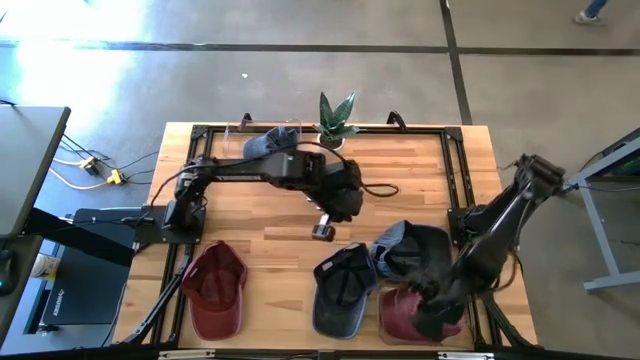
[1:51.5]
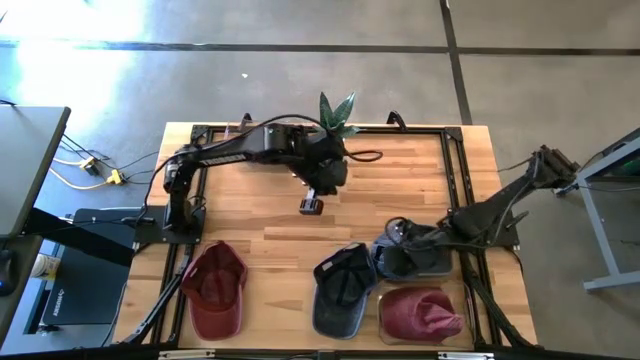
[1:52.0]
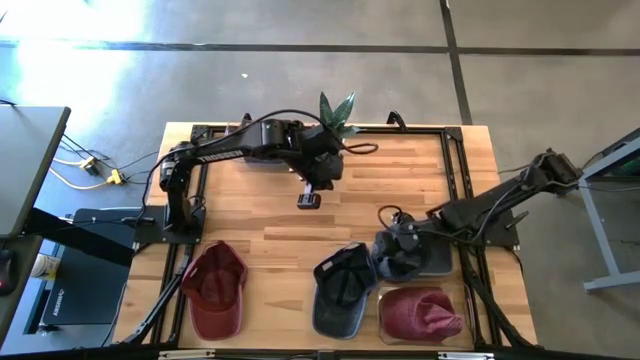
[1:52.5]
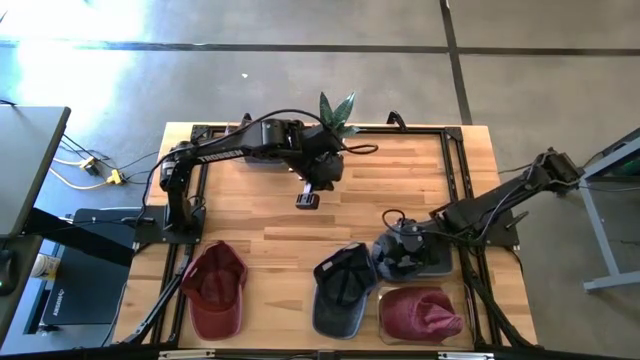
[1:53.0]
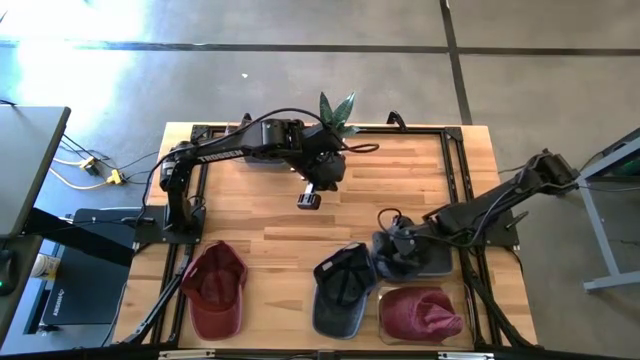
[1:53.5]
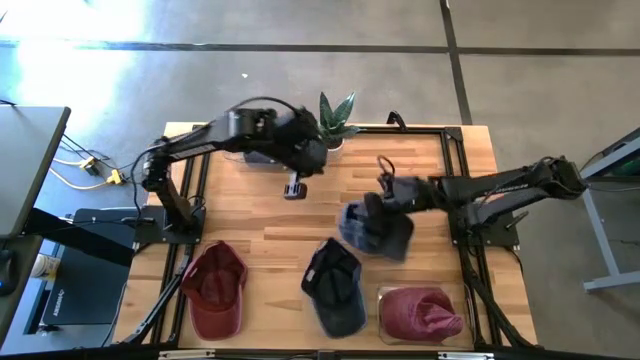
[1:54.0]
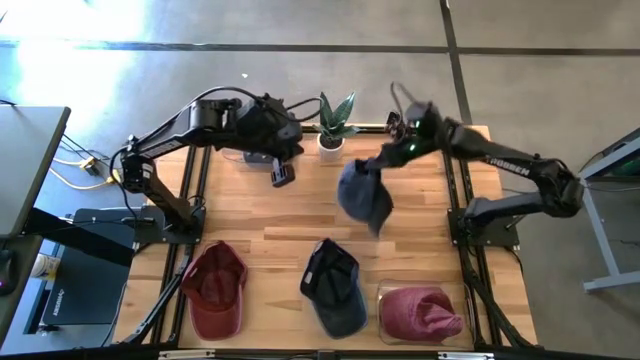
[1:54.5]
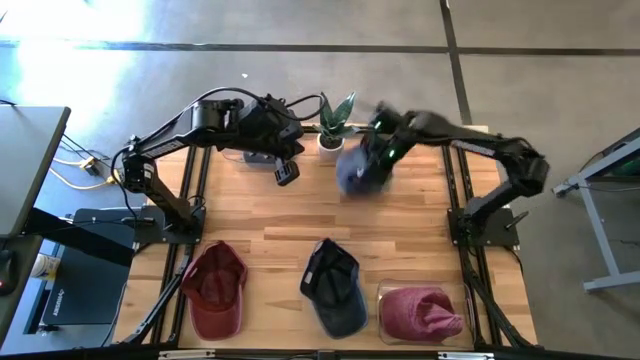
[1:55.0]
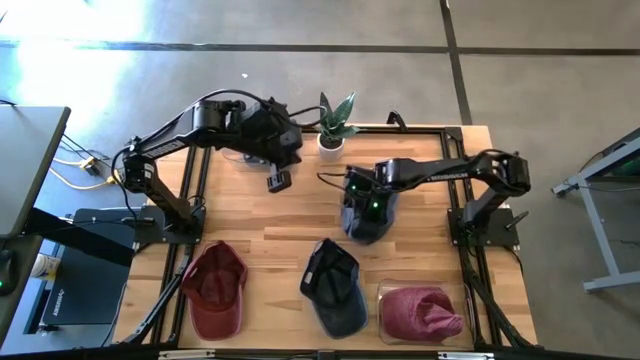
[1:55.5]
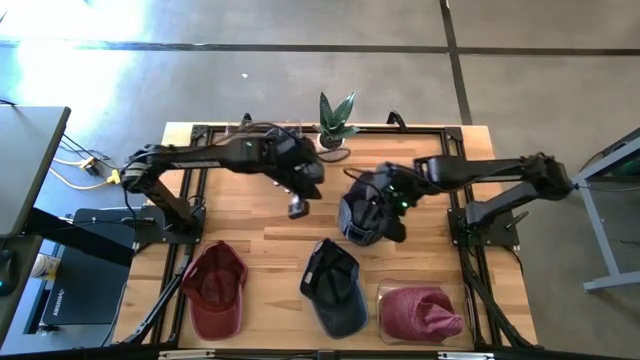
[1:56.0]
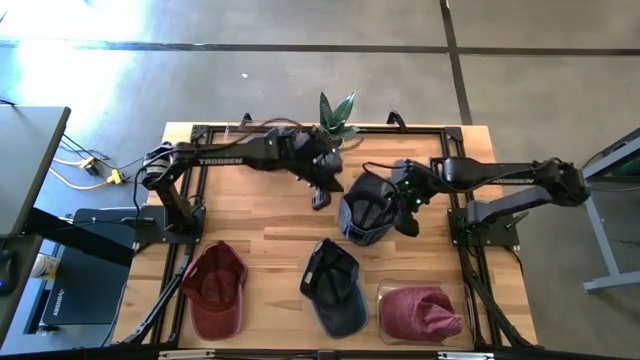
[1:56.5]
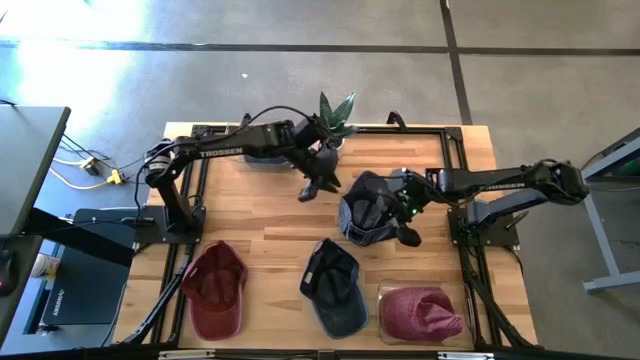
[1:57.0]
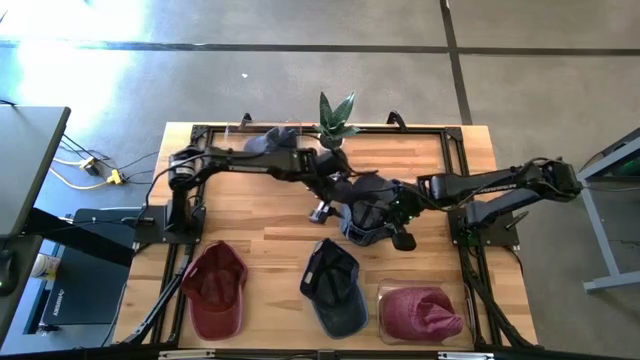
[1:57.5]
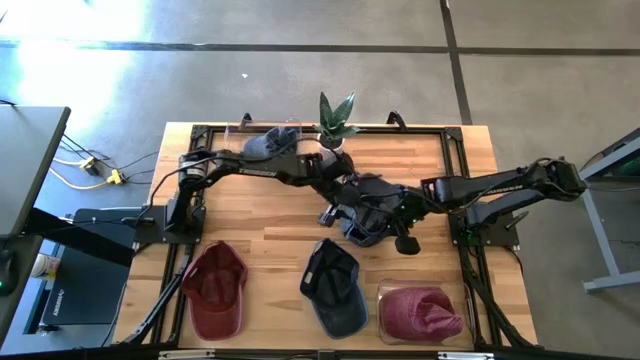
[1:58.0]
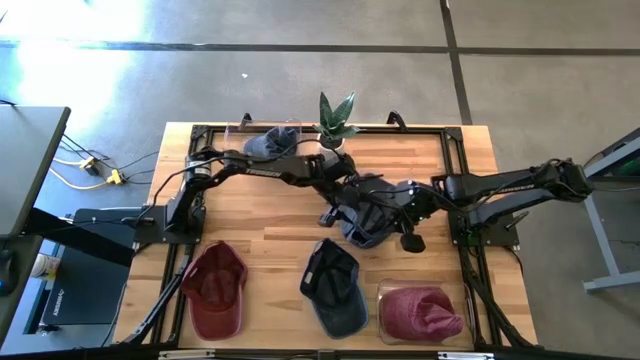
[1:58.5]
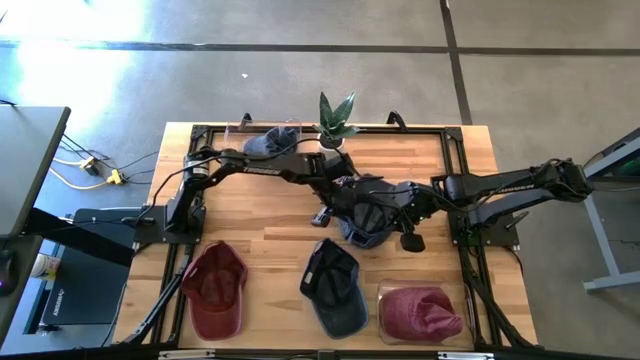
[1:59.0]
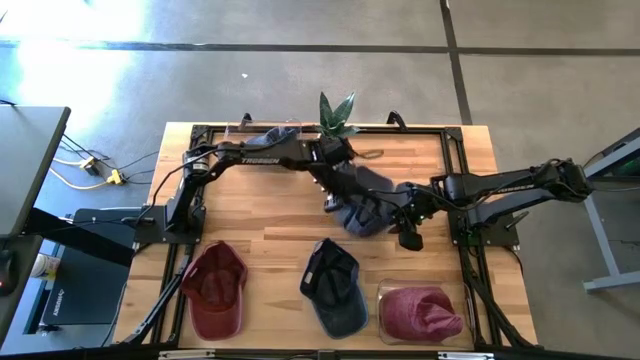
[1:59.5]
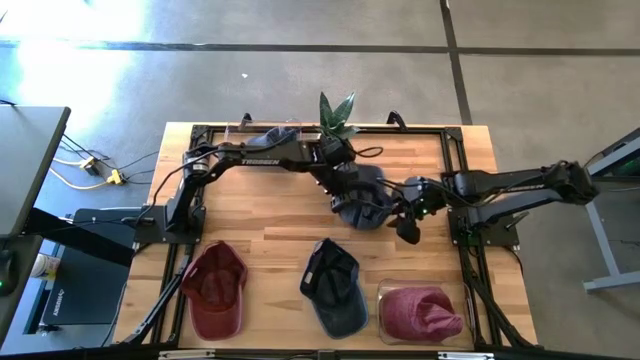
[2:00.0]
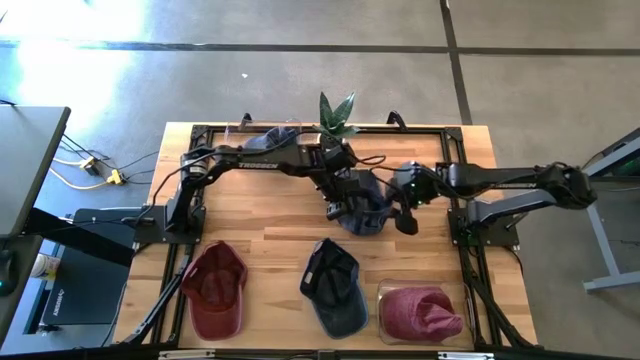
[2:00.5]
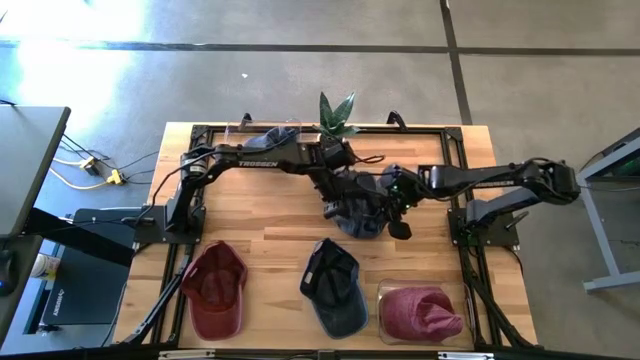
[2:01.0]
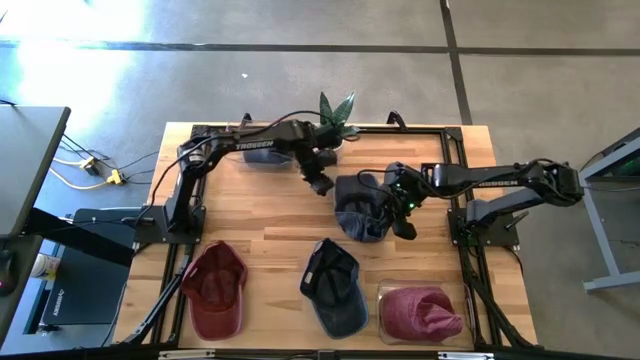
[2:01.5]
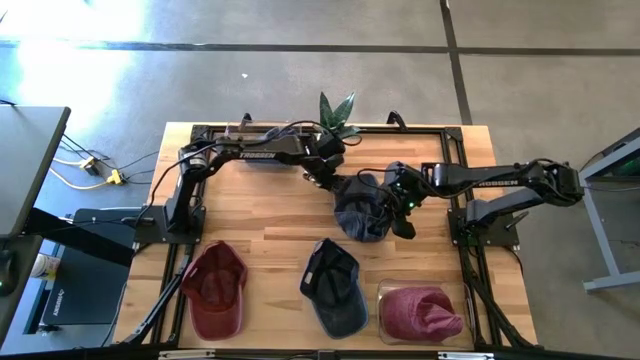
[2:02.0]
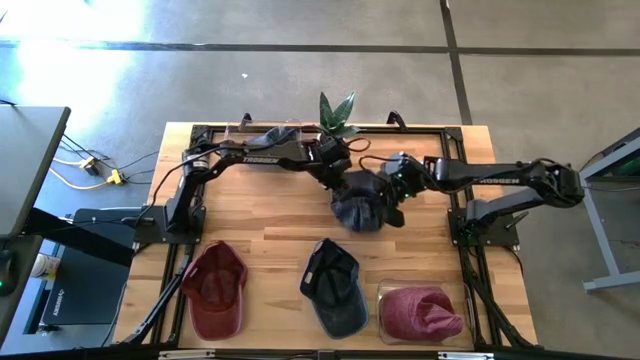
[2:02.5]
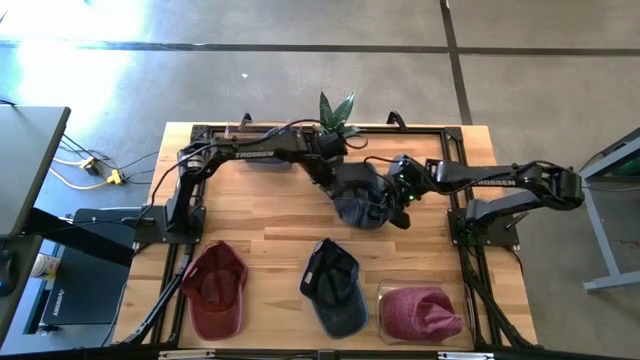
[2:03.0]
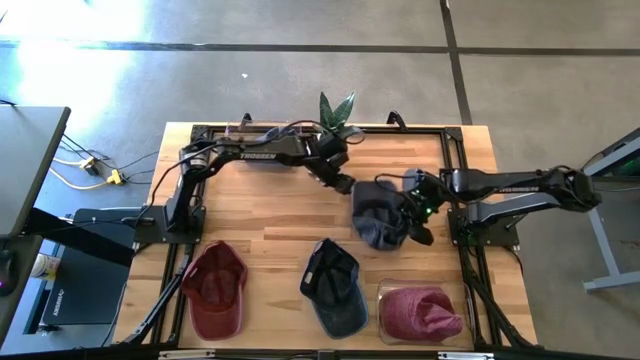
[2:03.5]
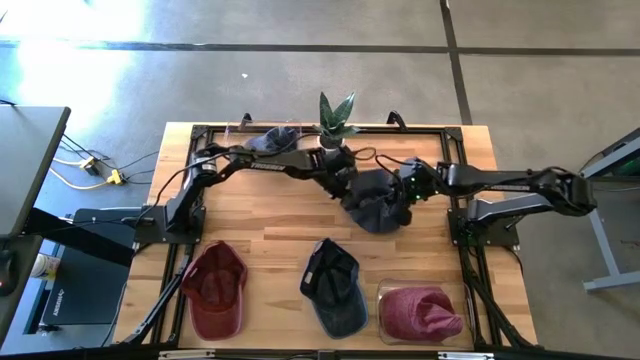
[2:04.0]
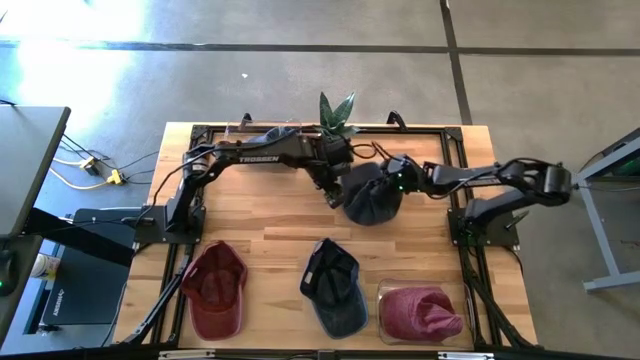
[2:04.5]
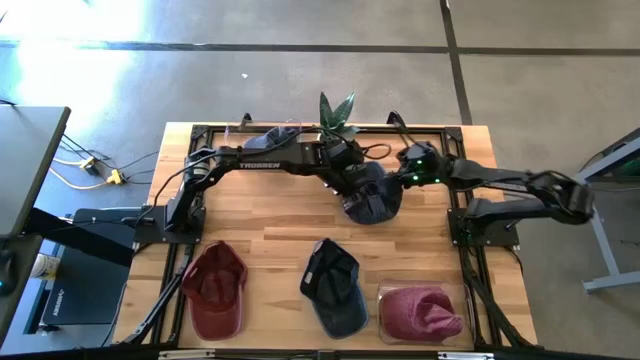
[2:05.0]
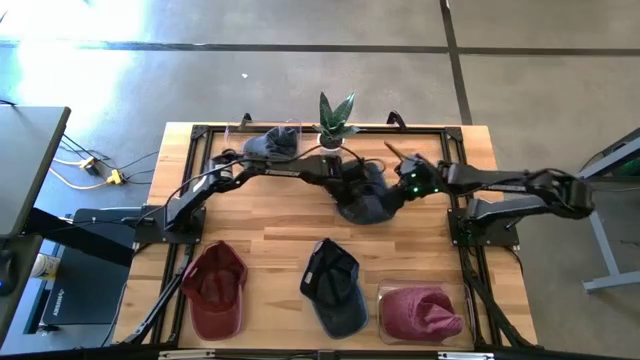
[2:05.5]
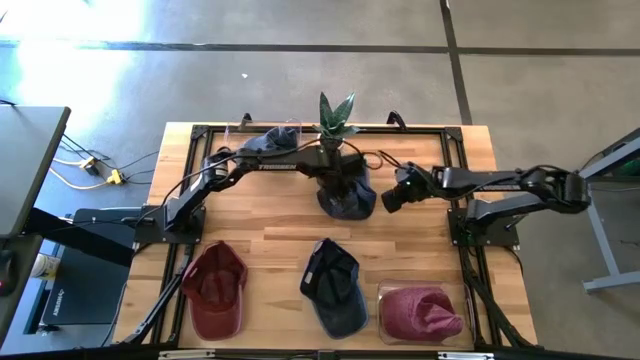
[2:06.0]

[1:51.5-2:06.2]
Task: Pick & Place hat
Put the right blue cap into the top transparent bin

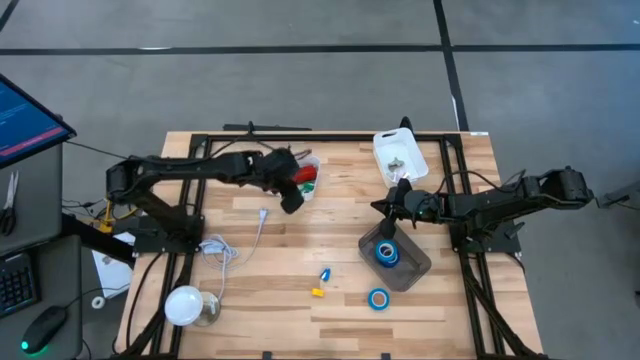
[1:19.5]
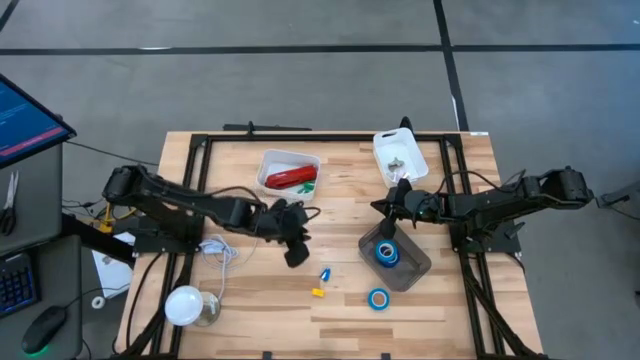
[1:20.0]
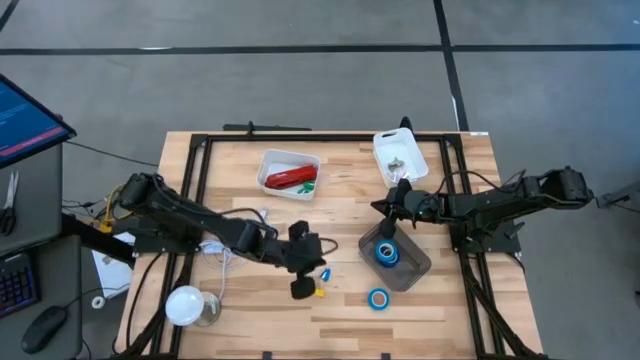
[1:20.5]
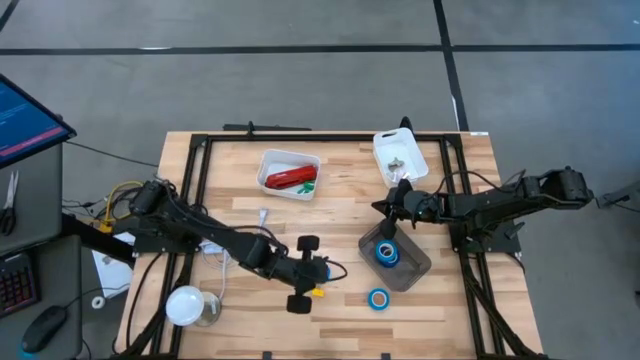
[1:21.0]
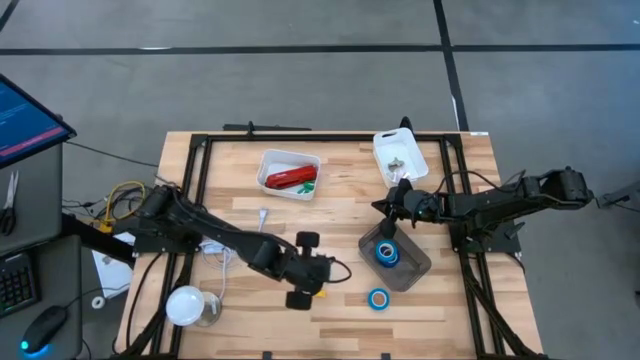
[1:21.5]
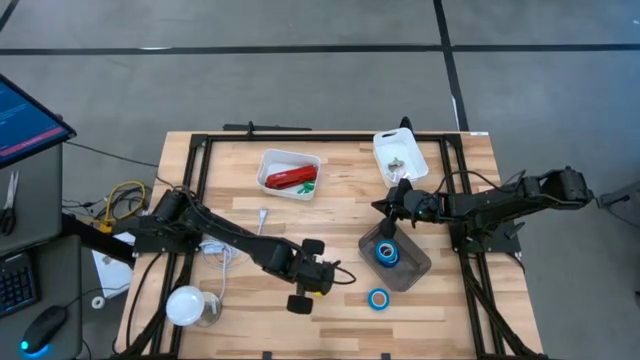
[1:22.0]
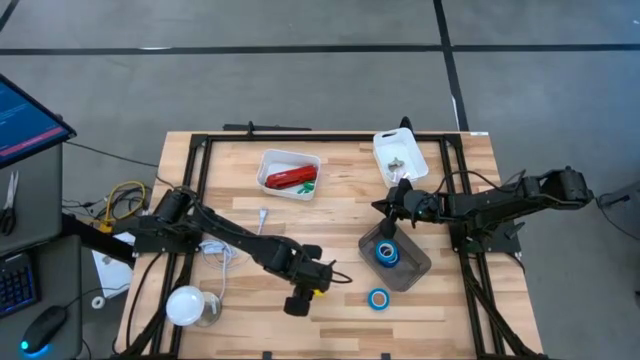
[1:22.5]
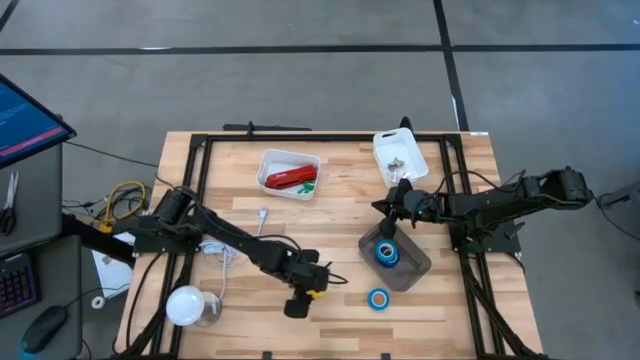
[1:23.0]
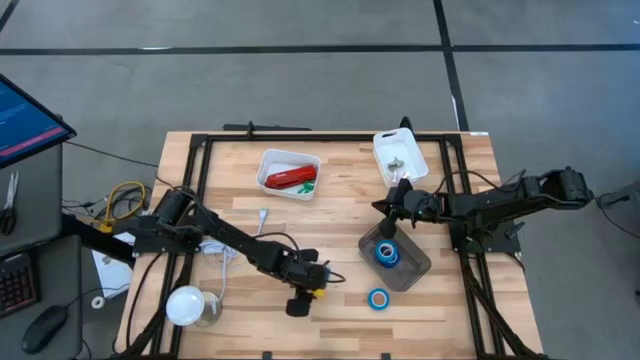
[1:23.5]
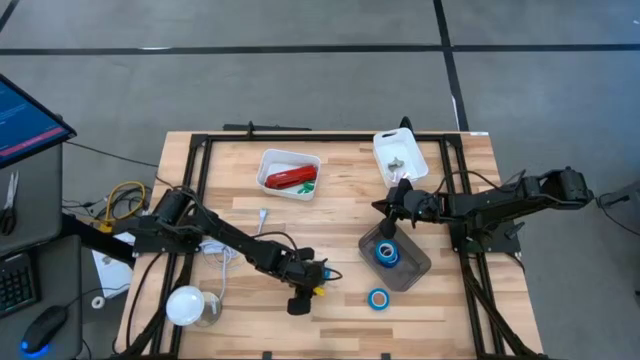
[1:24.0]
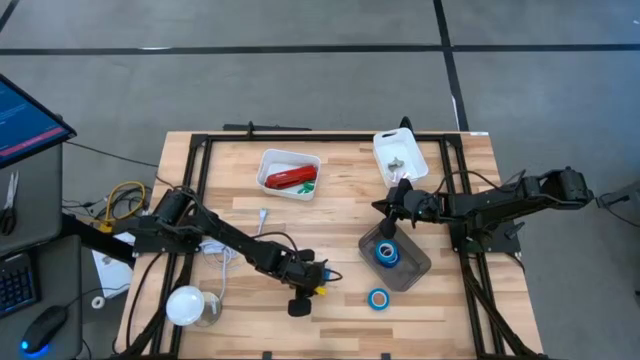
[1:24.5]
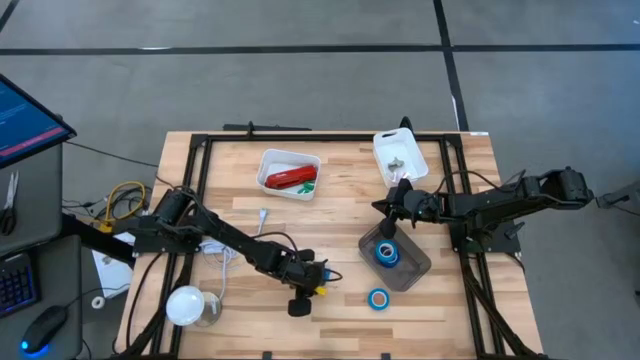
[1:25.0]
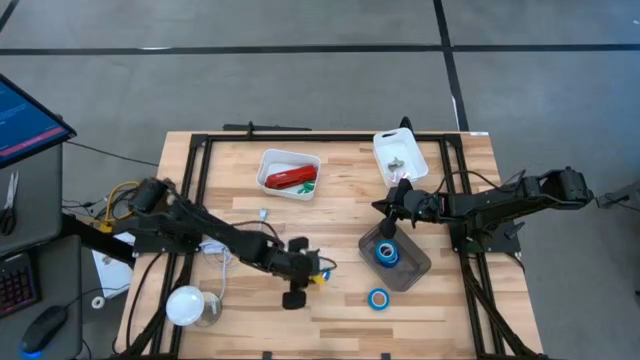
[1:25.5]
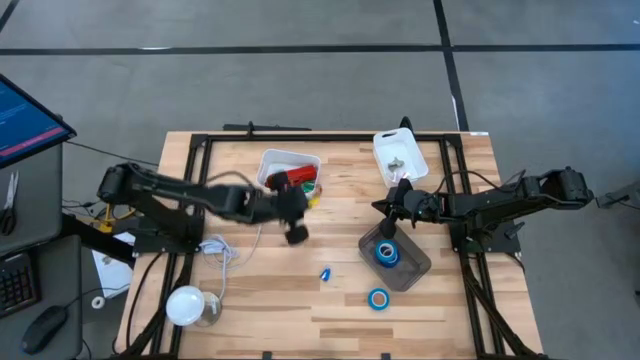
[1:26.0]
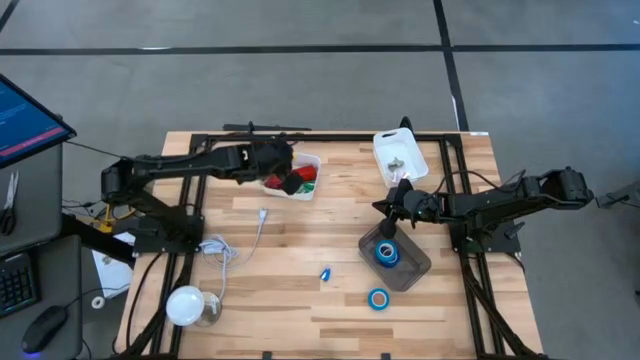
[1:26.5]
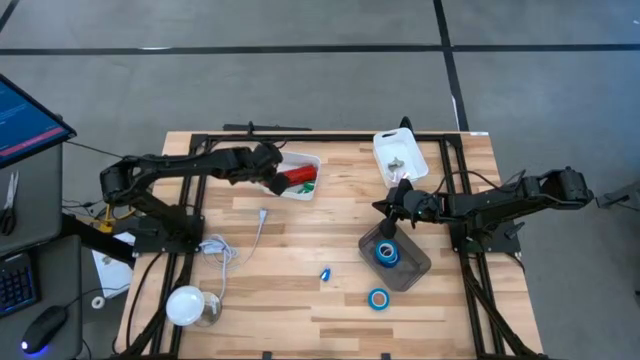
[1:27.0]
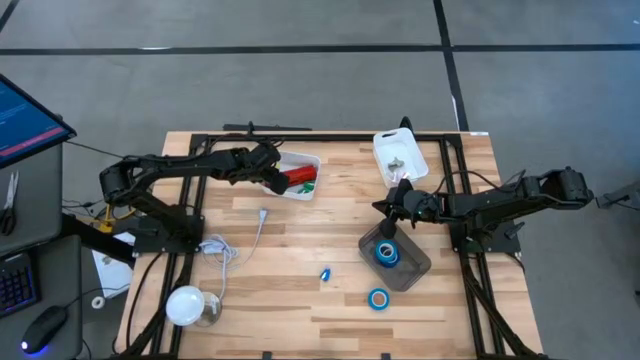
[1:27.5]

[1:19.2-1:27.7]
Task: Pick and place Stapler, Stapler remover, tape
Put the yellow small stapler into the left white bin
